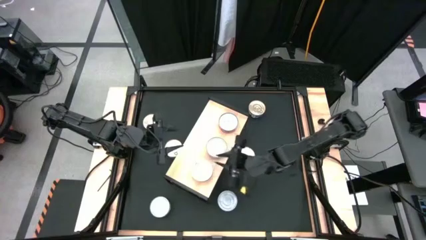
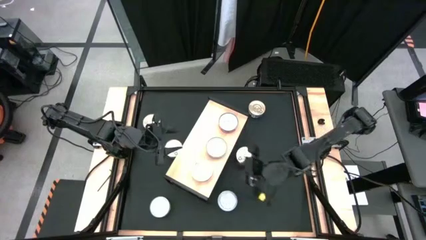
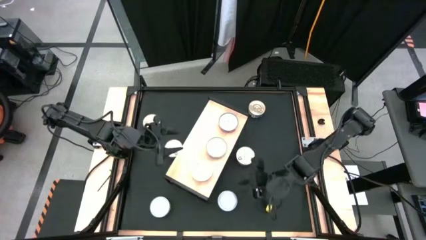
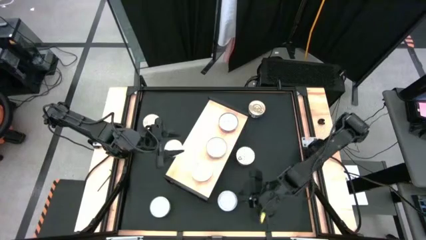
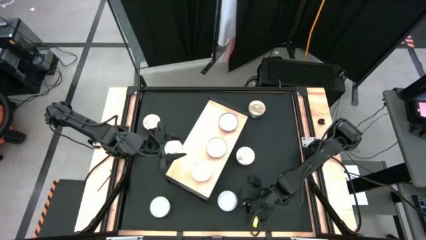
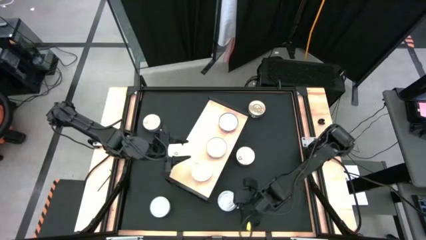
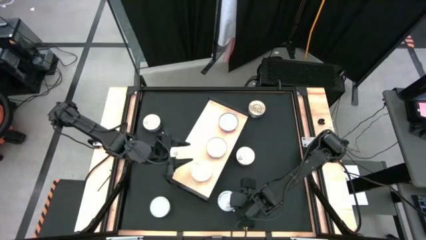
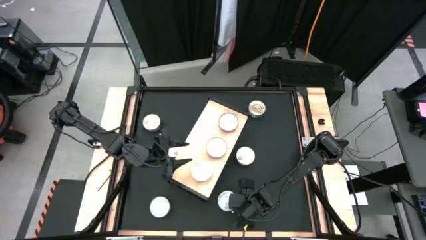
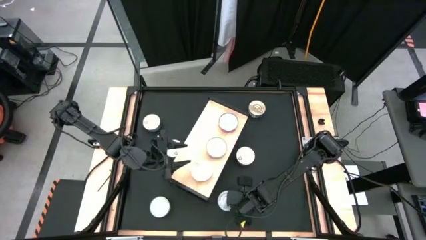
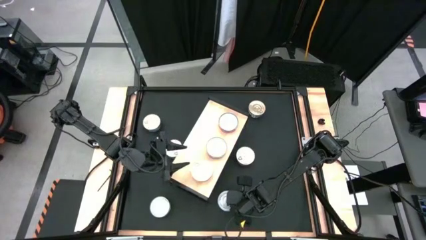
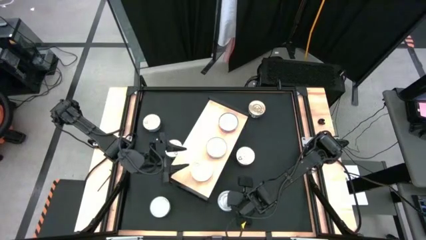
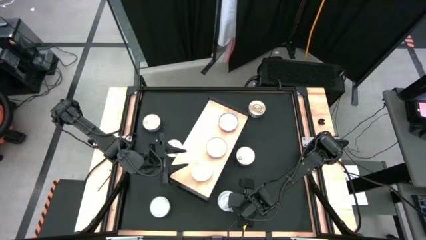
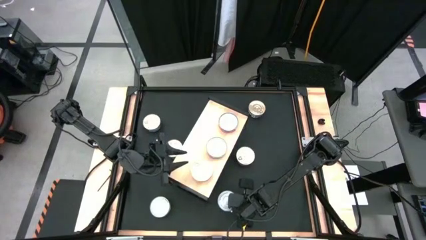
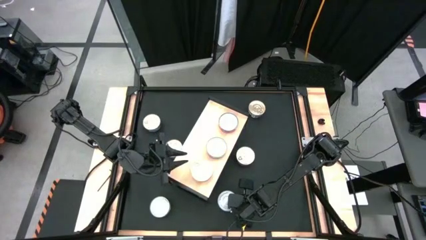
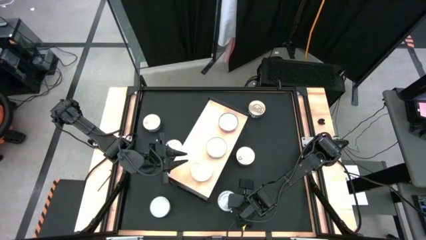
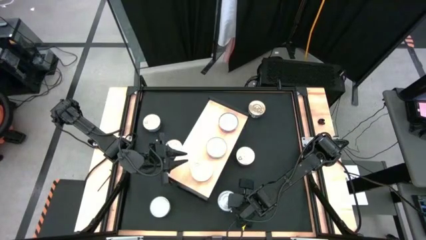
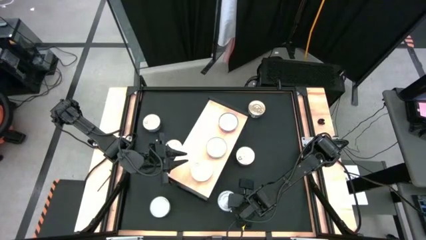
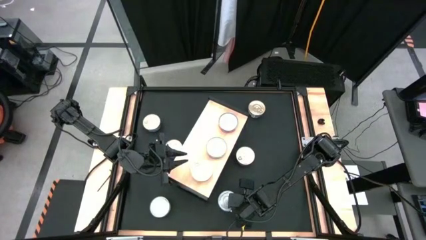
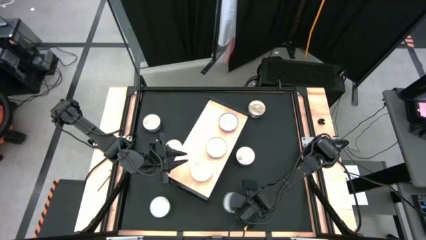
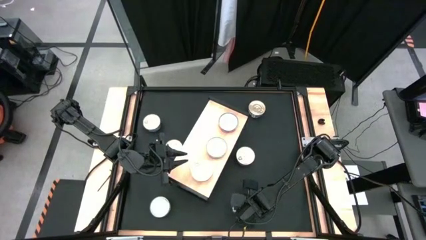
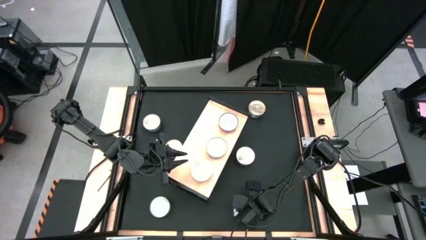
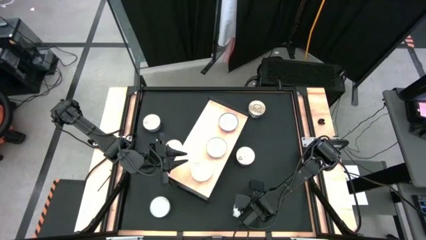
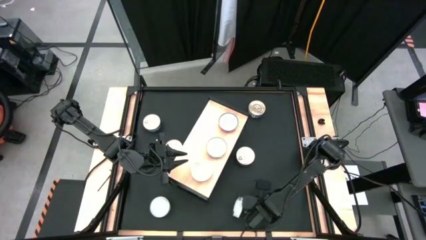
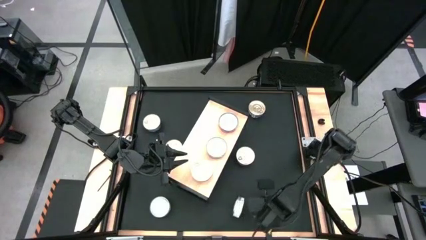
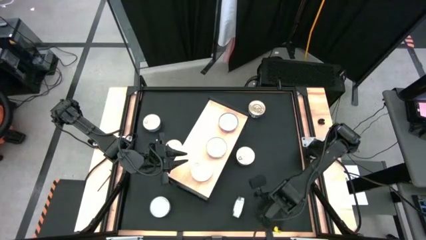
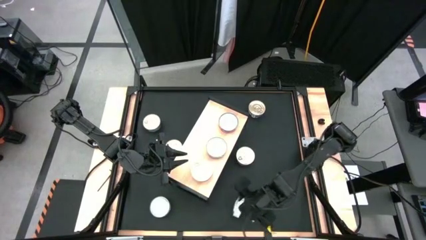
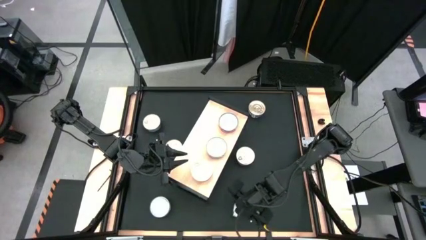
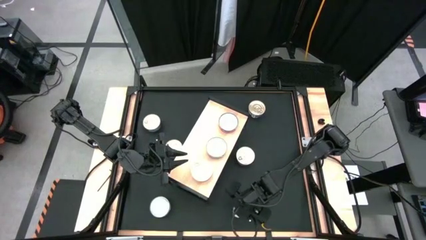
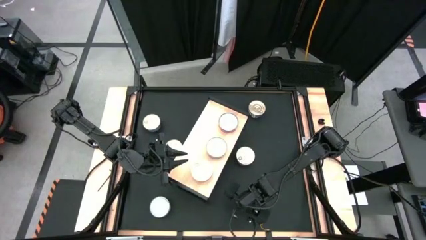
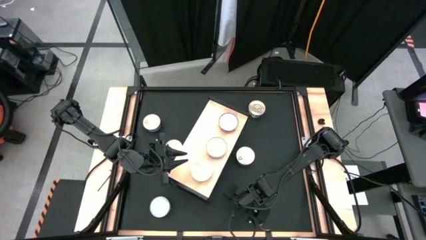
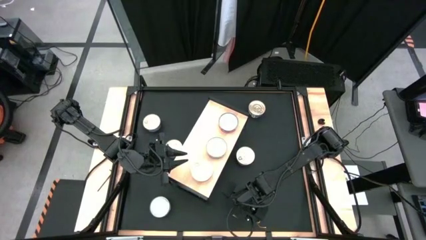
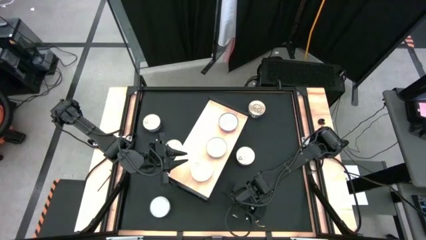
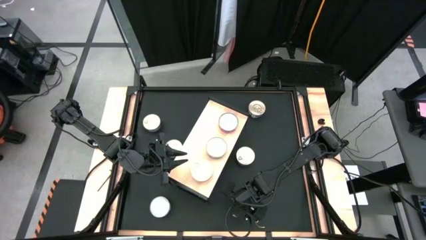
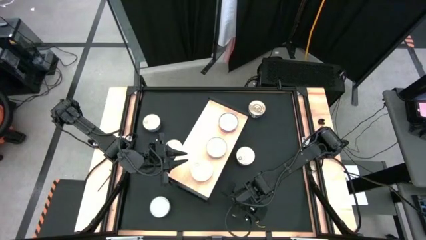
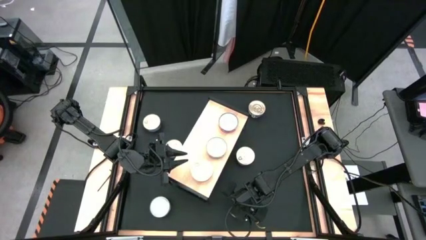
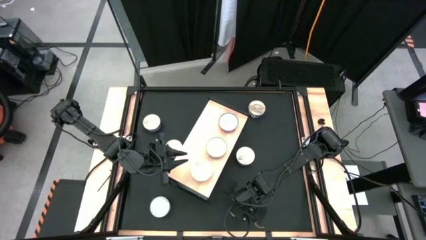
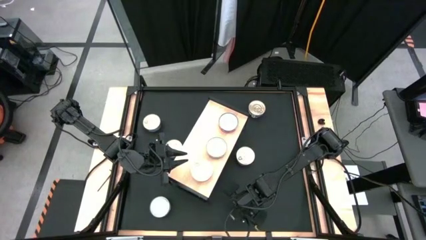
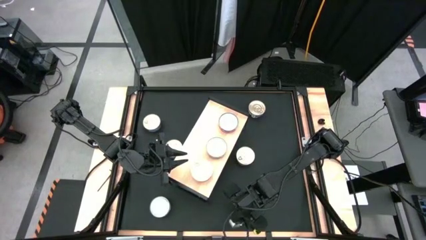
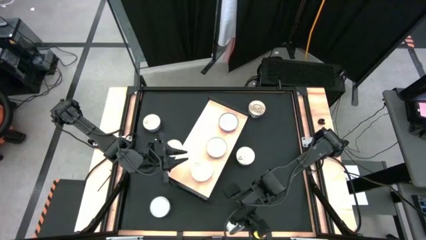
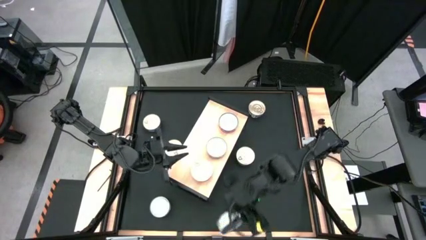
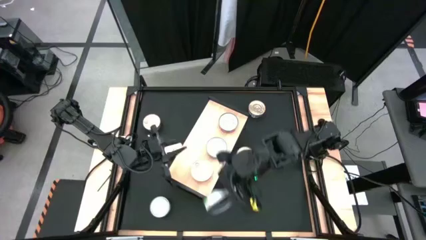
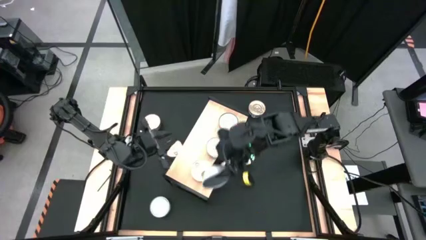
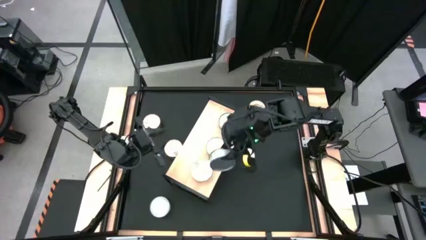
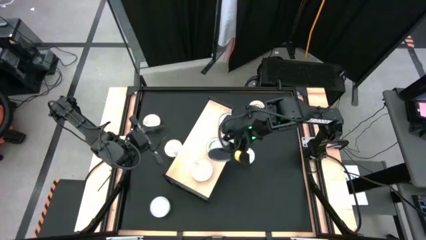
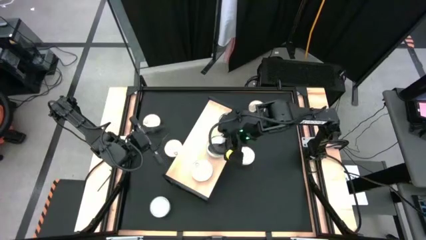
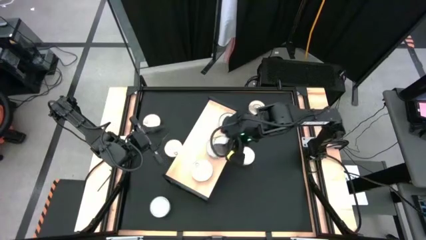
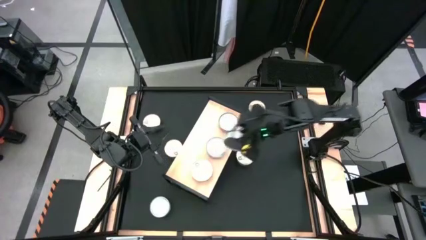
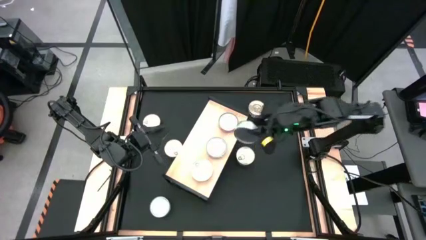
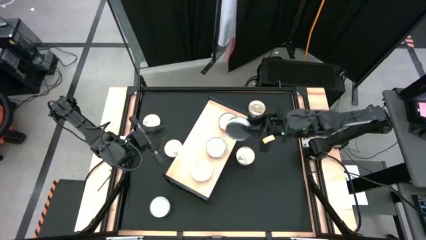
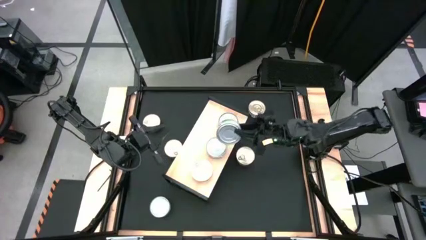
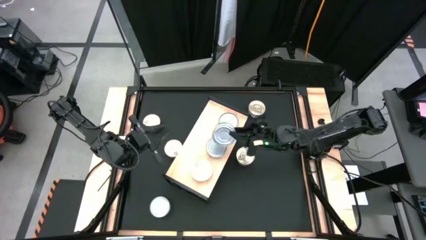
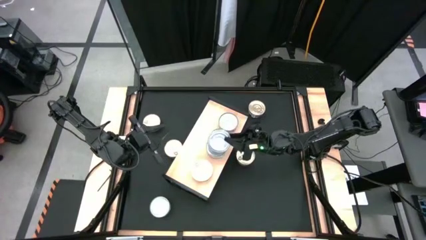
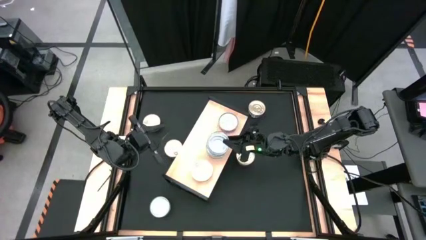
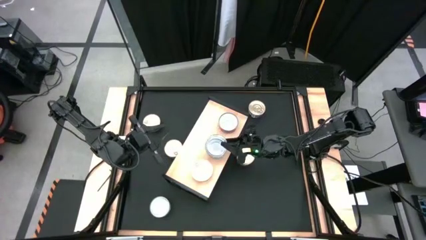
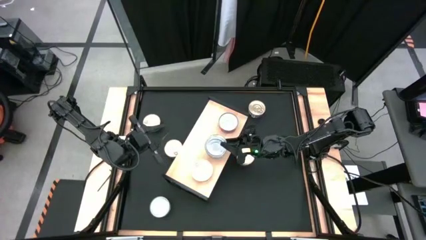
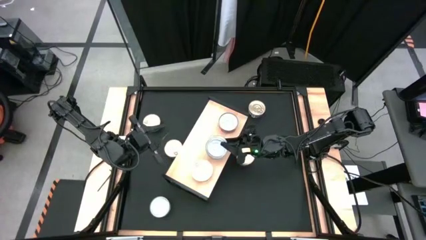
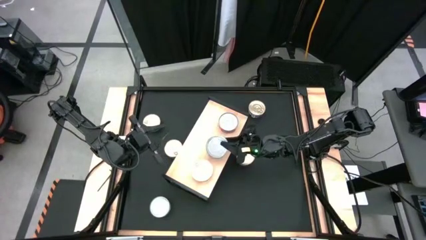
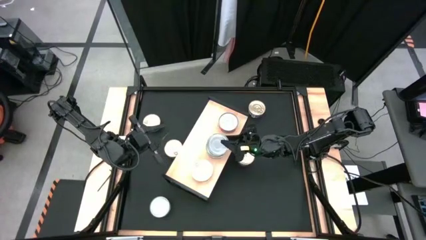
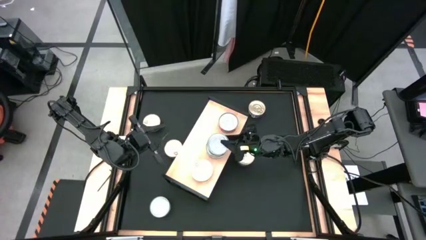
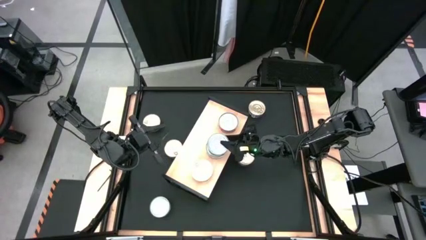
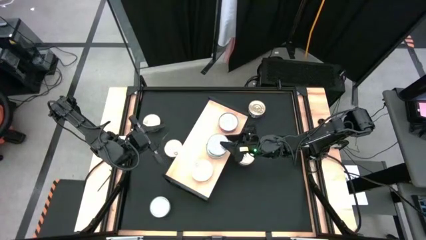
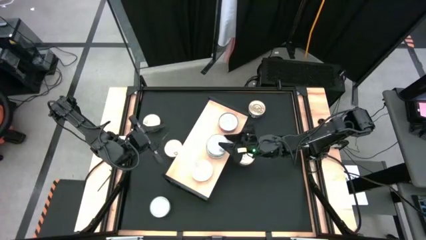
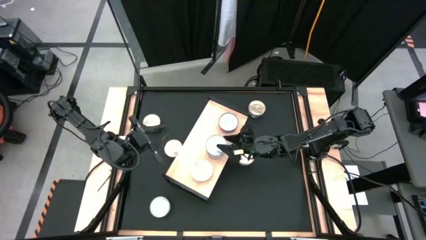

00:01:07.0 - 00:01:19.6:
Task: Stack canned seafood by type on shelf
Stack the green tuna can on top of the other green tuna can on the shelf

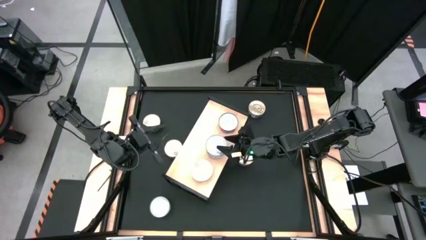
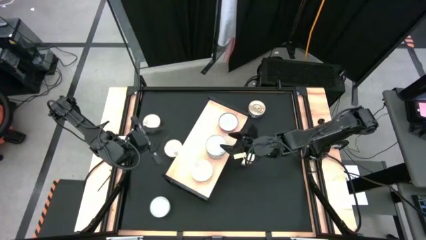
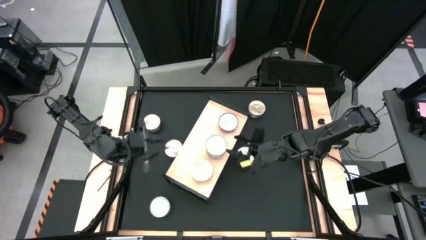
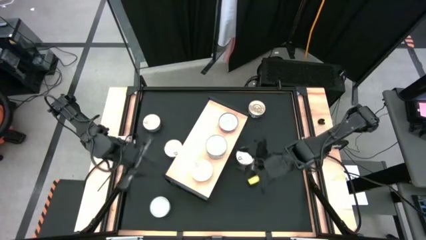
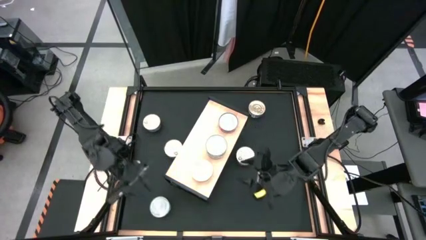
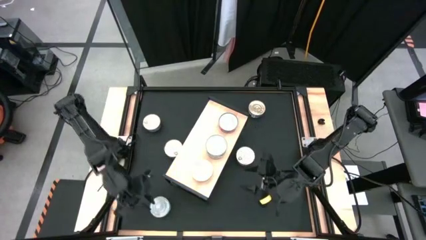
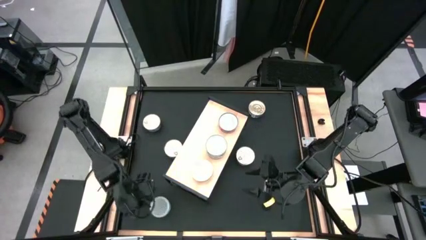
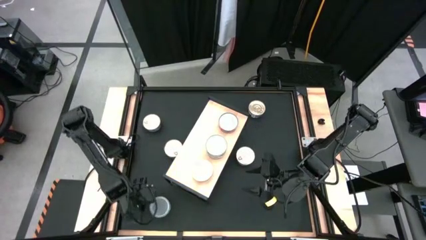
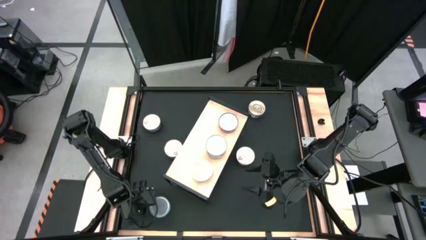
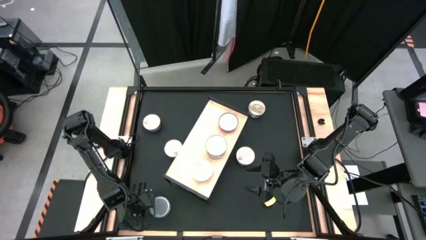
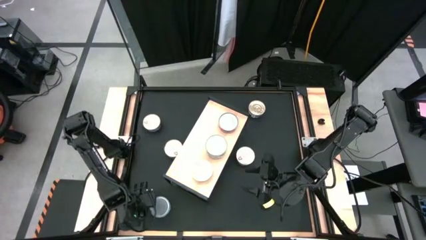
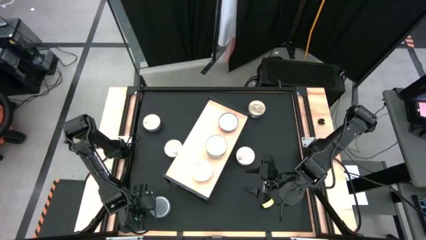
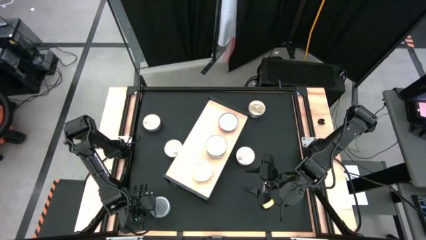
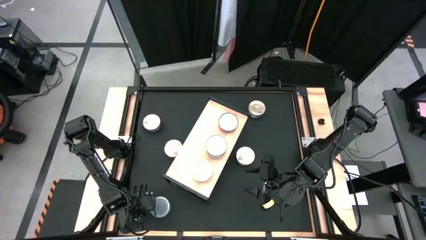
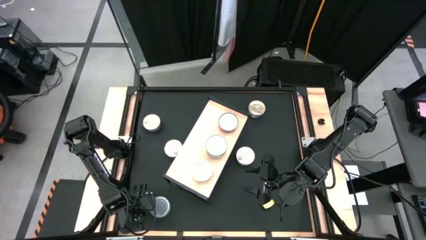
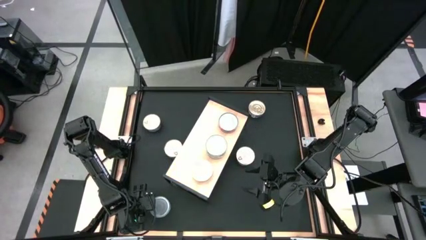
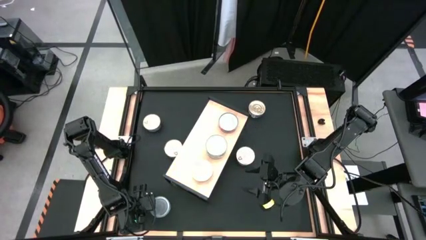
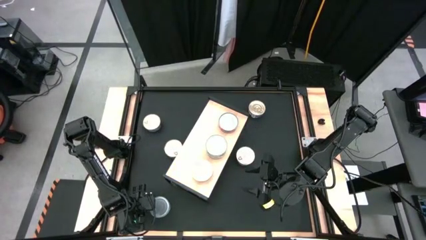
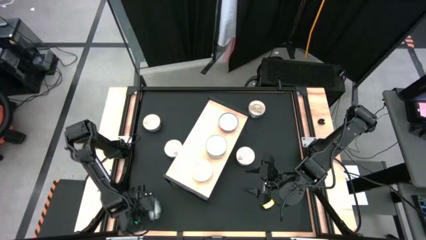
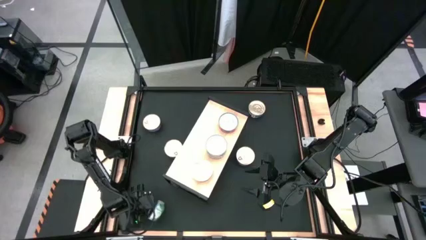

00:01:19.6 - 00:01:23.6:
Stack the green tuna can on top of the other green tuna cans on the shelf
